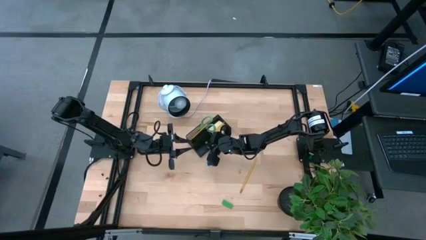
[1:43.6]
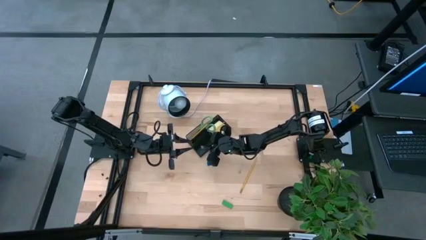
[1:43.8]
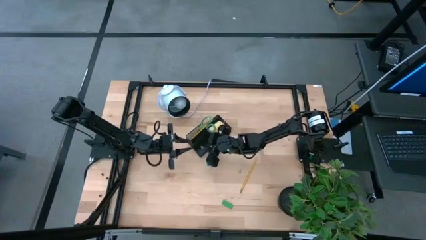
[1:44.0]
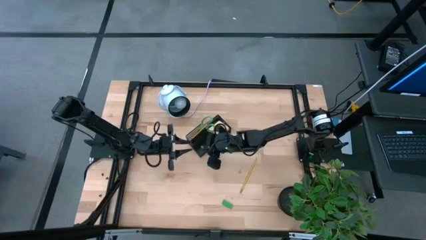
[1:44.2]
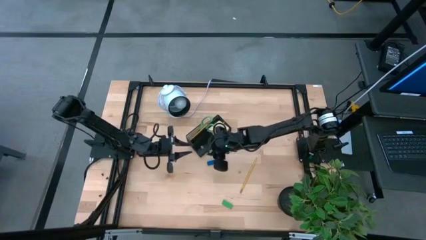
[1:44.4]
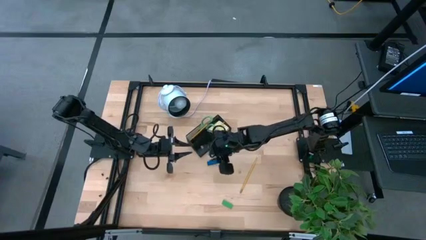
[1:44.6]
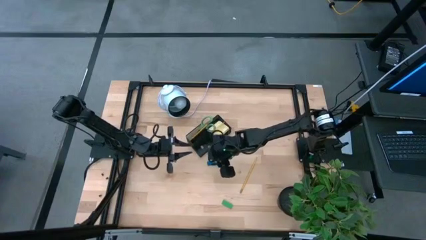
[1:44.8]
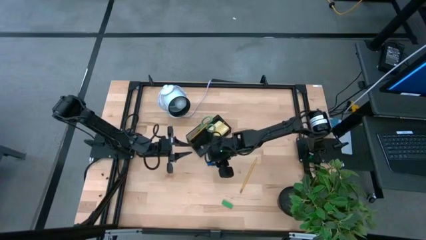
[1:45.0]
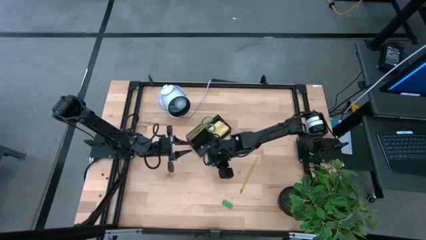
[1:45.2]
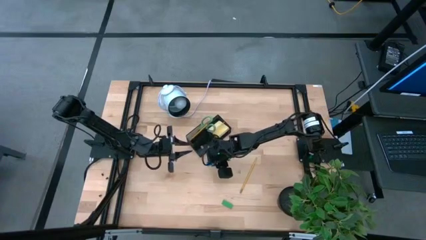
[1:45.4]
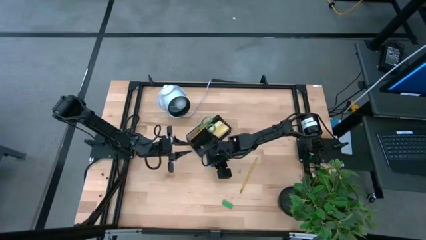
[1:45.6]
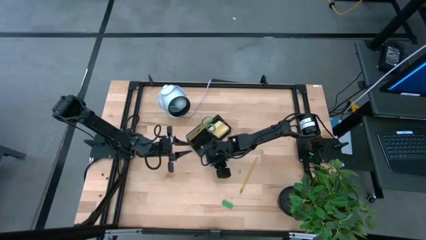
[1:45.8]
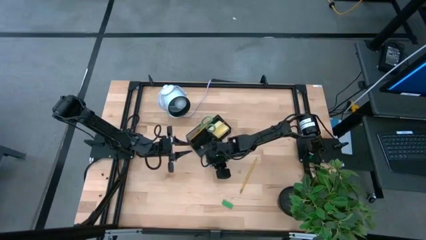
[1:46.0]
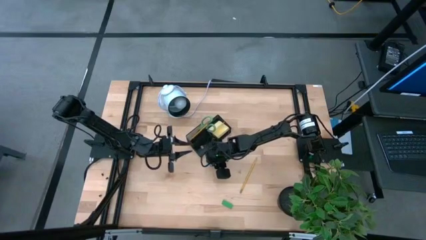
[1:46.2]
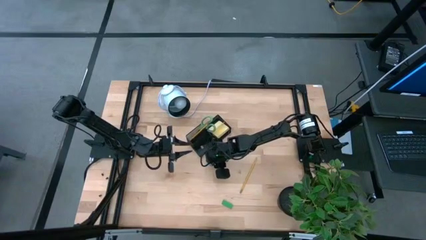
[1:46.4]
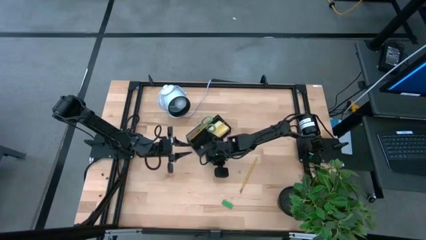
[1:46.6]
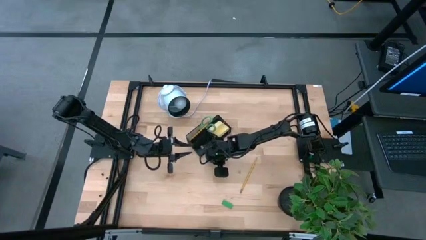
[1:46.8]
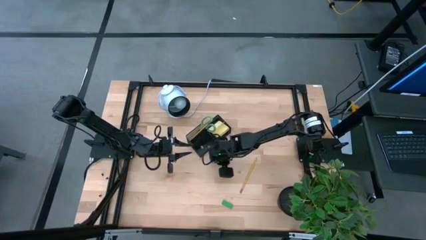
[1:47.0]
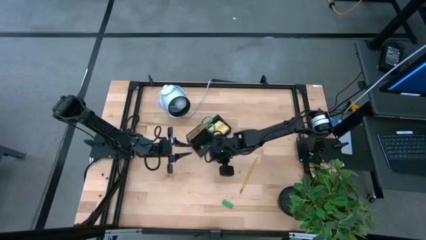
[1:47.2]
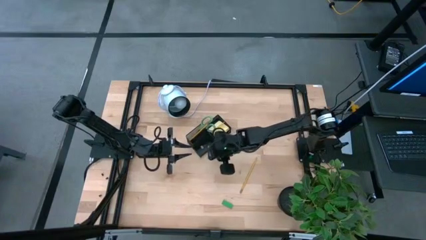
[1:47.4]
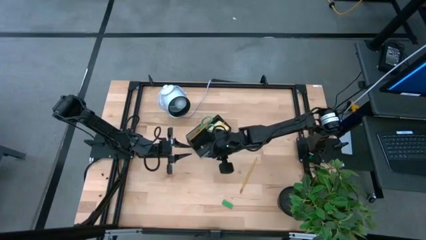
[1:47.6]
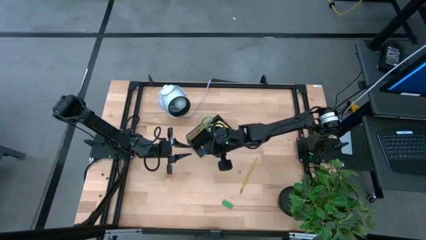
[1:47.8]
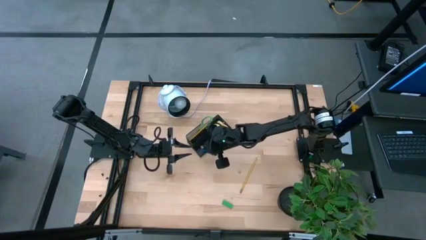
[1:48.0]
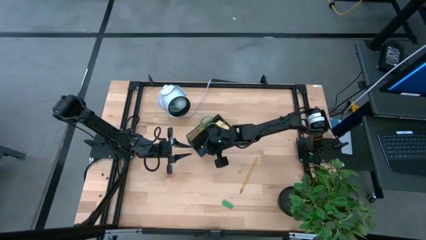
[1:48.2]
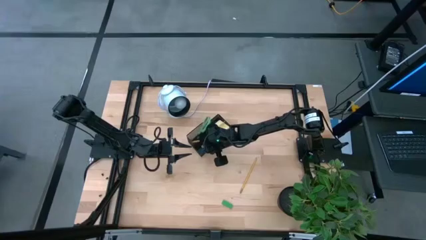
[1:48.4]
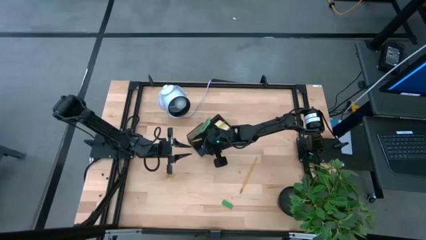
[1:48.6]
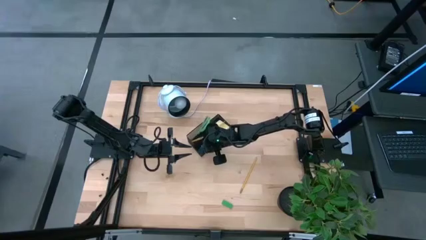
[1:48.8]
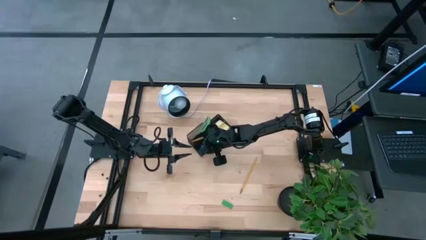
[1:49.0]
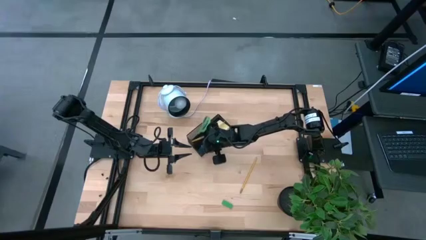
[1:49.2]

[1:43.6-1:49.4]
Task: Pick and place office supplies into organizer
Put the blue eraser into the black desk organizer

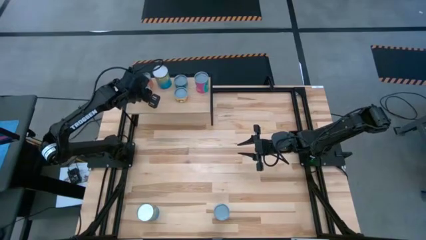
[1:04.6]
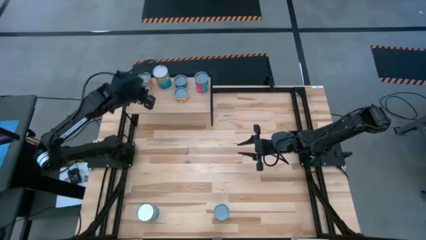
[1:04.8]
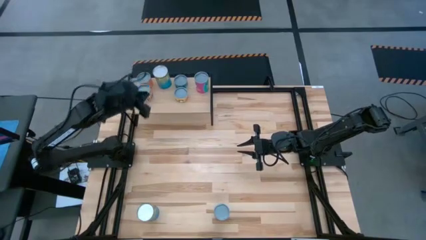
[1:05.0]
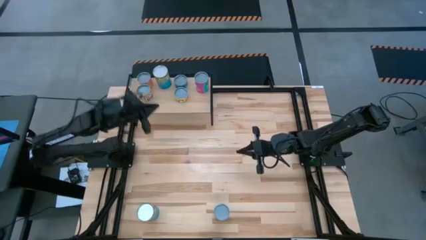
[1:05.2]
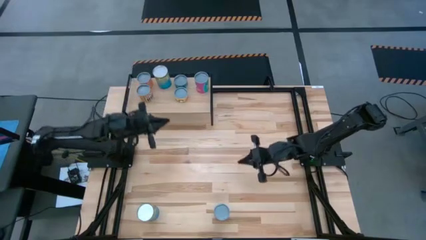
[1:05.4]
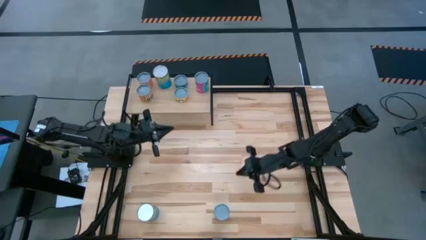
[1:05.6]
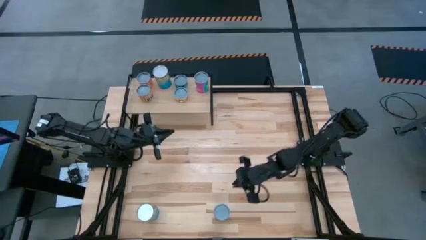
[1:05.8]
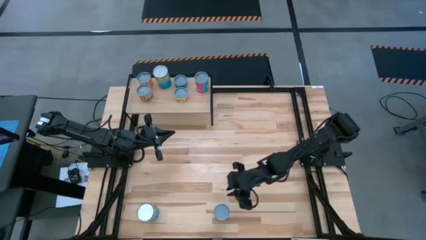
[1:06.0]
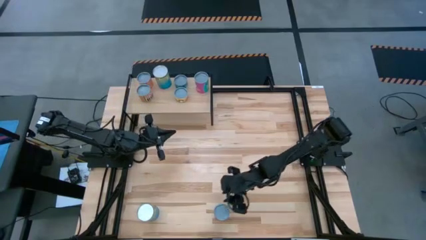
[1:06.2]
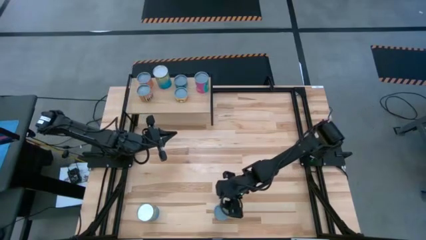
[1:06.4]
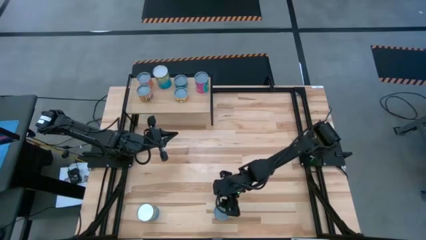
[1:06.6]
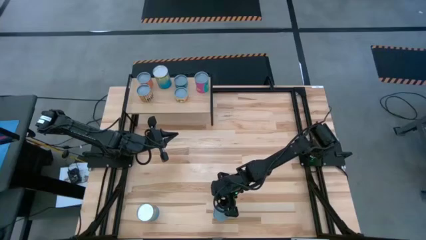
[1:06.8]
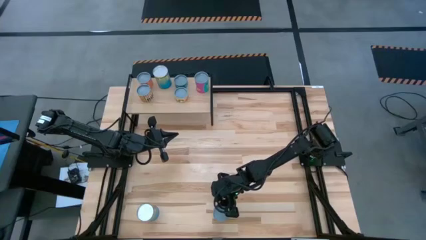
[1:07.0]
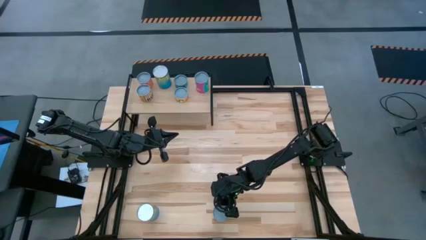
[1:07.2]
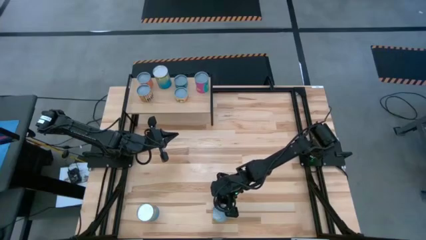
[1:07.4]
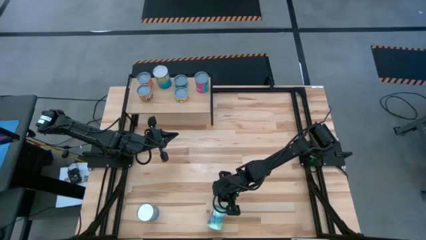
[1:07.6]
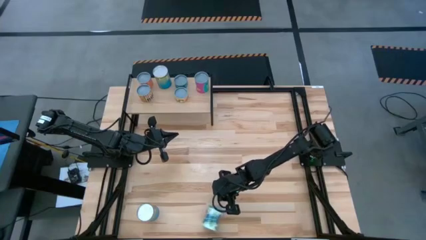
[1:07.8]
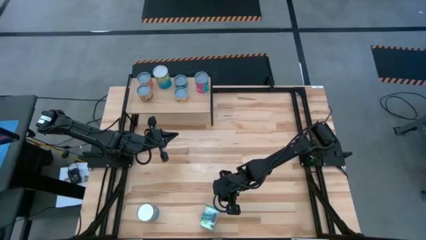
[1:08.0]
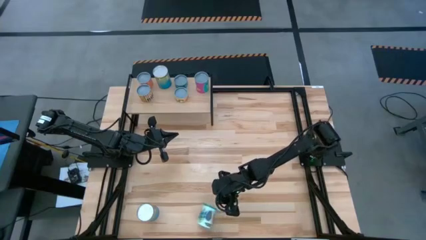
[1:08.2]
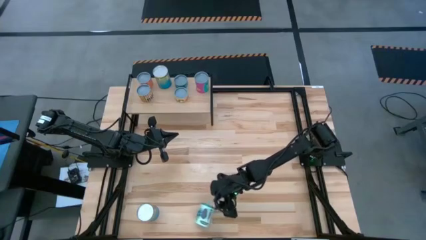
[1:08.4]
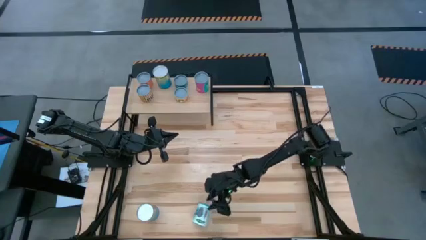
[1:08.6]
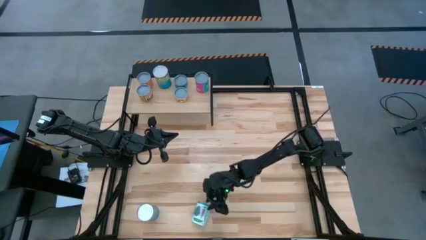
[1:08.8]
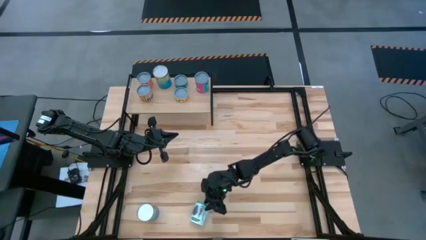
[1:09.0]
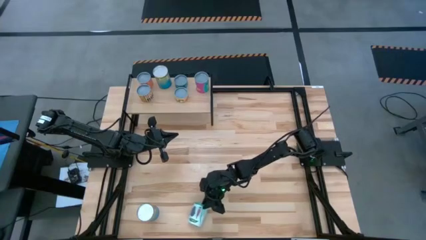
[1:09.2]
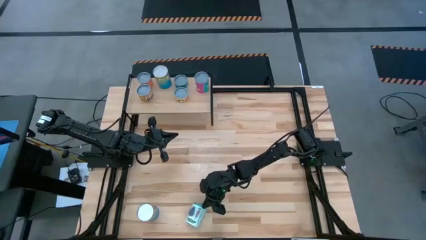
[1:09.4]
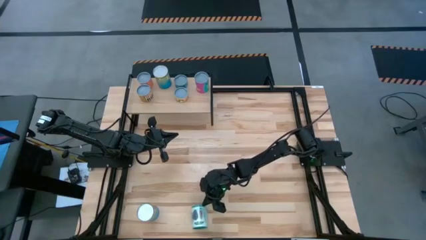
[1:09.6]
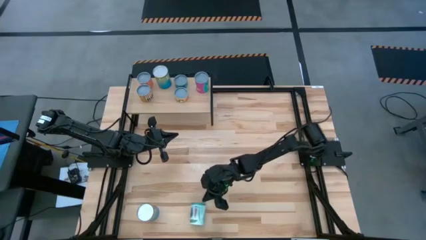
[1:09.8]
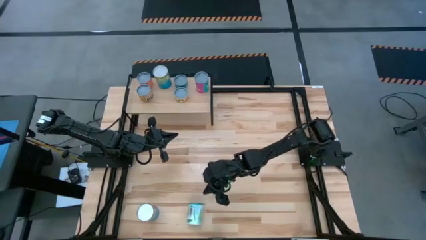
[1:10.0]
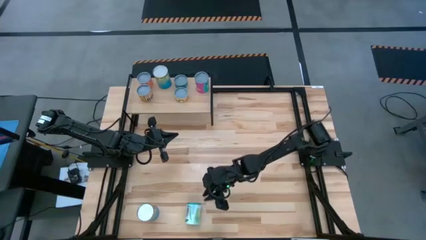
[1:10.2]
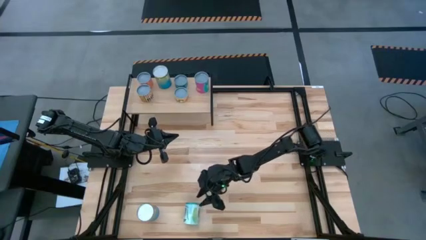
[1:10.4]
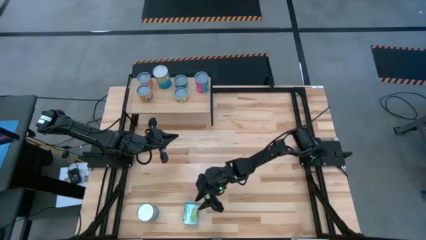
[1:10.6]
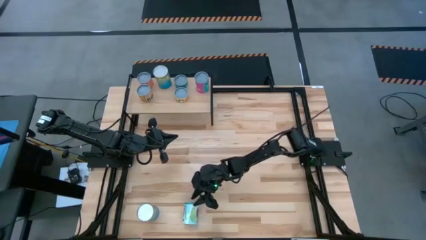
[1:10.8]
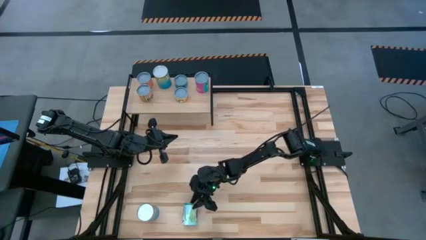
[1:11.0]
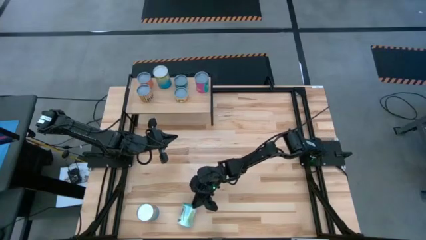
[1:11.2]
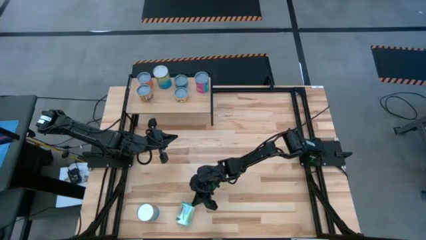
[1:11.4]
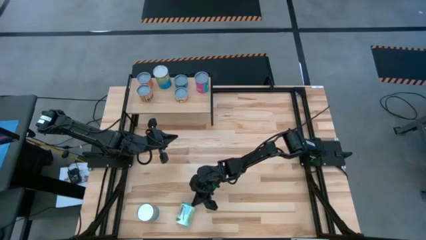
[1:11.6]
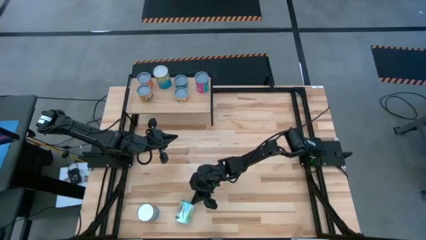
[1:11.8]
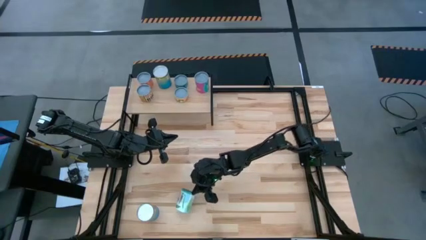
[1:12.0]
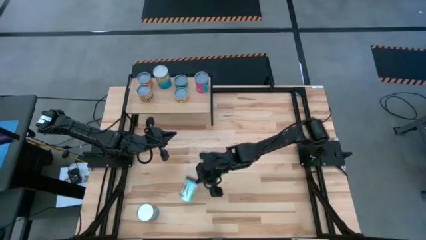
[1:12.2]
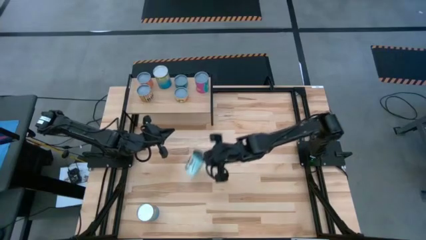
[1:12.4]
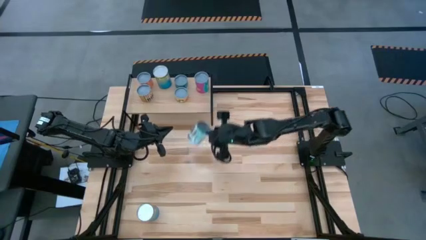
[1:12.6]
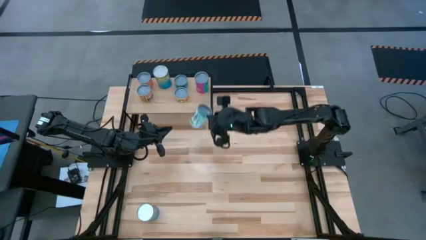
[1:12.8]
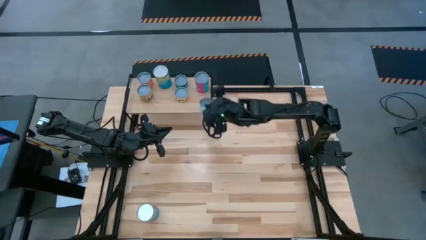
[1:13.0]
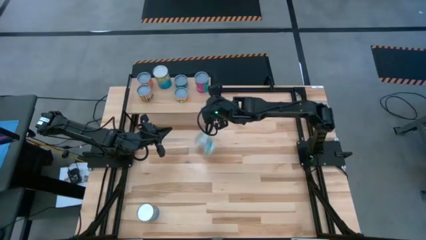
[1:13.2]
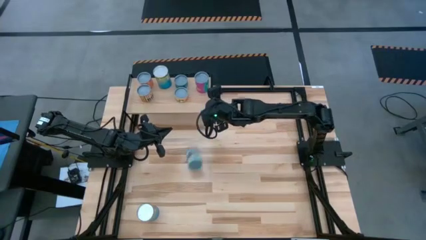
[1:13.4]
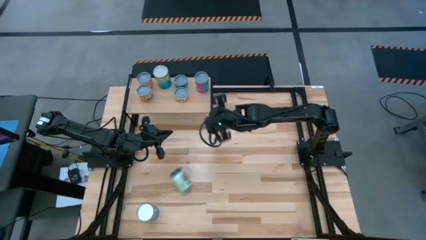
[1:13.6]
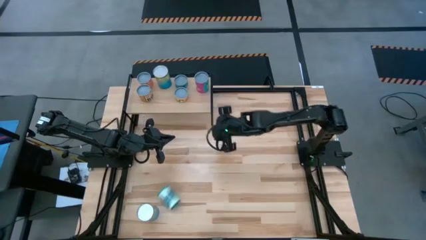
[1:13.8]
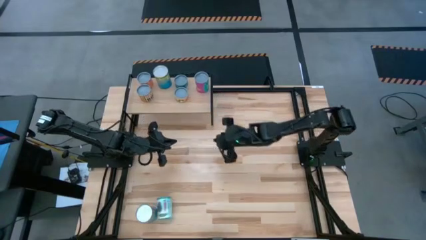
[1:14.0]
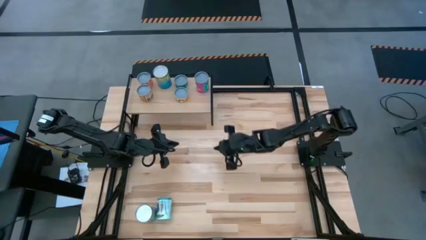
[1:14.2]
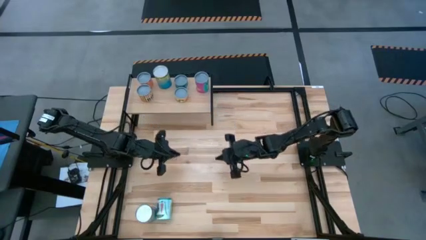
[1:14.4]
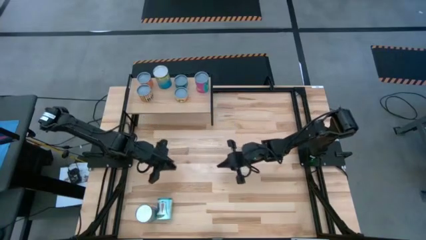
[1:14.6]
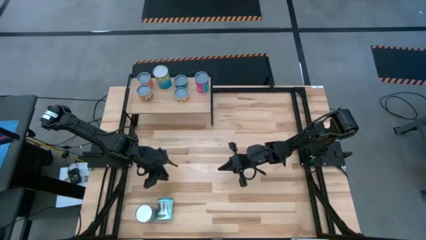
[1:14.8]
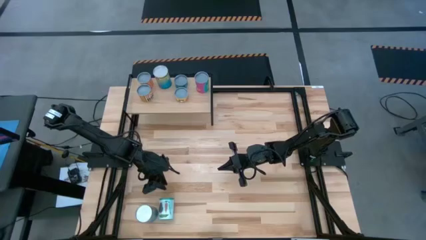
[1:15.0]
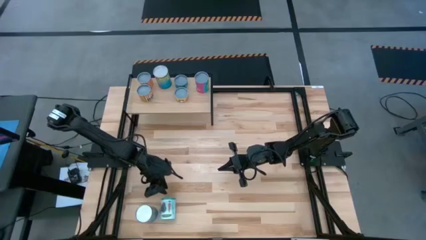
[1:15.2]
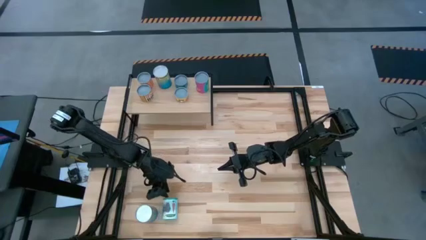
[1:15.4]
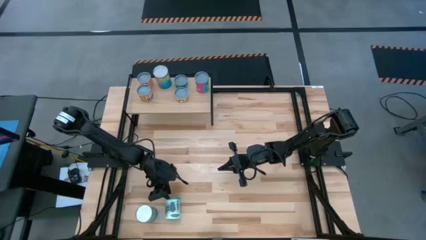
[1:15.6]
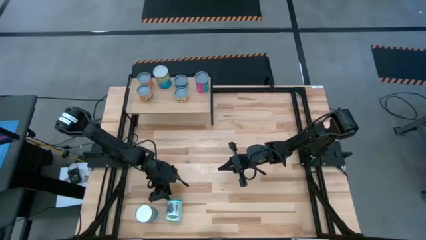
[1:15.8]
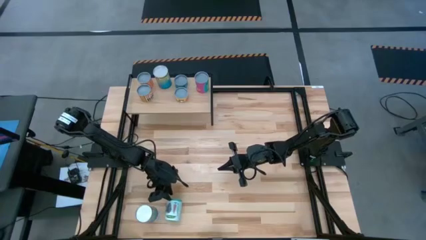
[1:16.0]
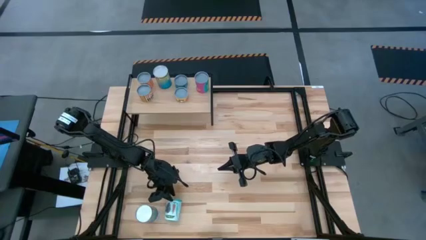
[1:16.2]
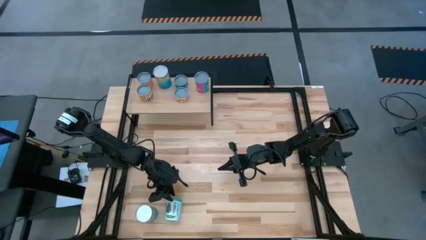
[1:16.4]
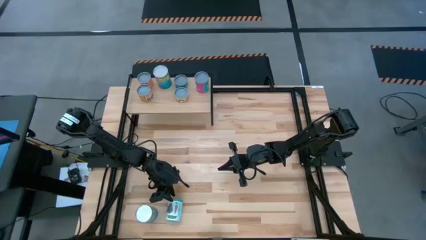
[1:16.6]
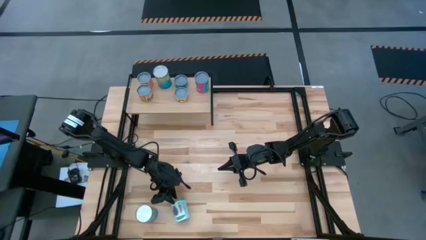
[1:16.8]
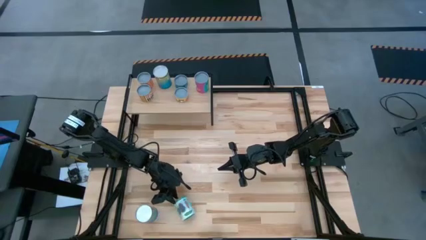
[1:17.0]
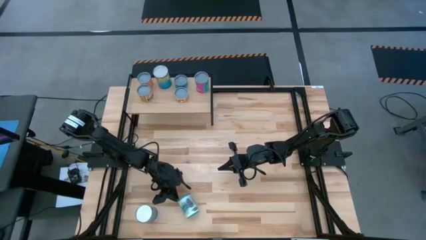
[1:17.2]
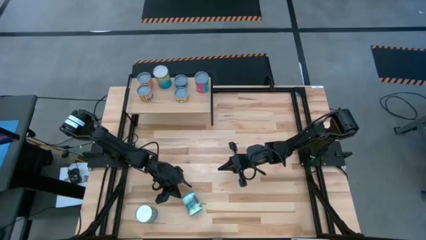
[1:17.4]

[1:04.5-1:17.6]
Task: Pick and place cans onto a shelf
Put the canned mixed vegetables on the shelf
